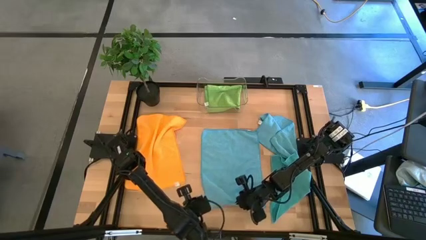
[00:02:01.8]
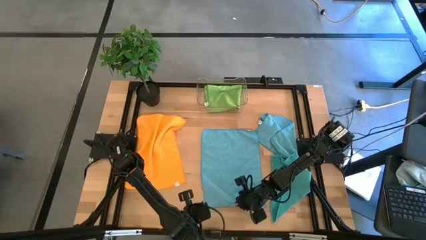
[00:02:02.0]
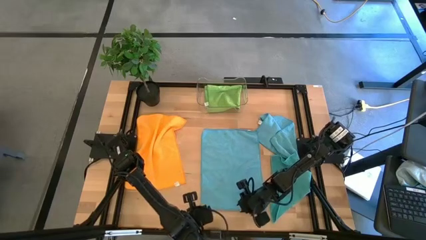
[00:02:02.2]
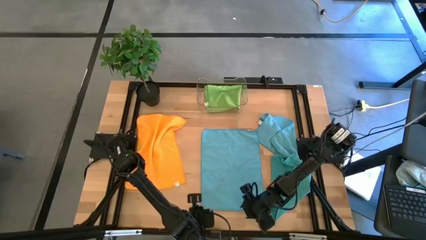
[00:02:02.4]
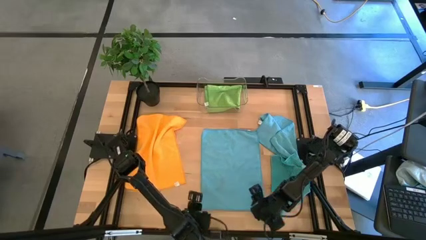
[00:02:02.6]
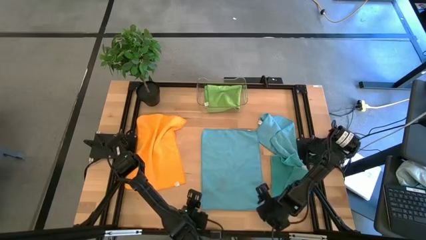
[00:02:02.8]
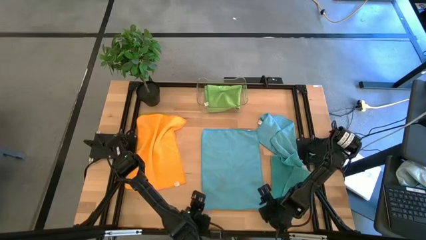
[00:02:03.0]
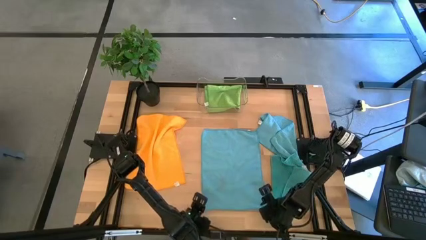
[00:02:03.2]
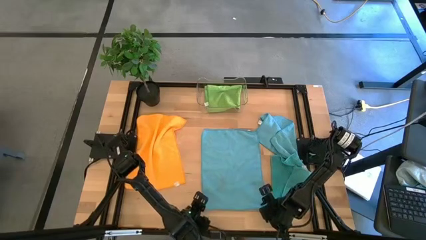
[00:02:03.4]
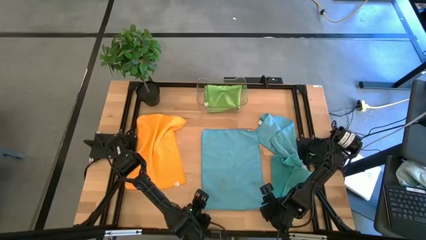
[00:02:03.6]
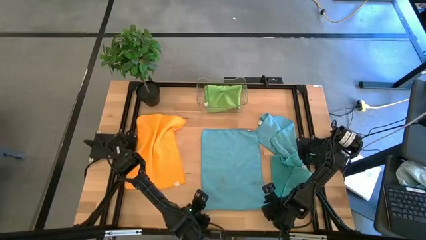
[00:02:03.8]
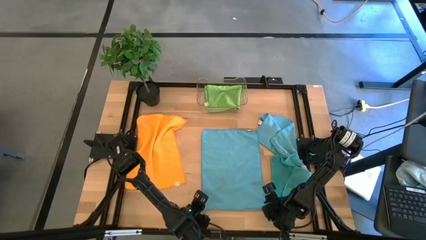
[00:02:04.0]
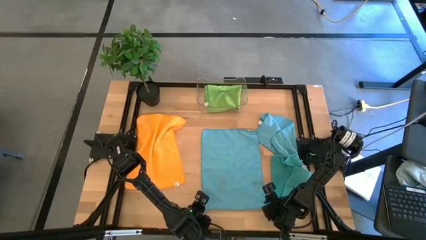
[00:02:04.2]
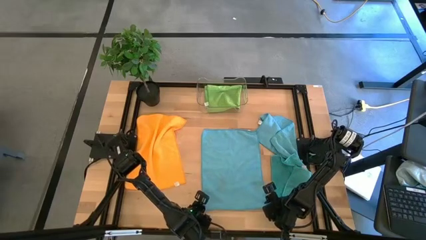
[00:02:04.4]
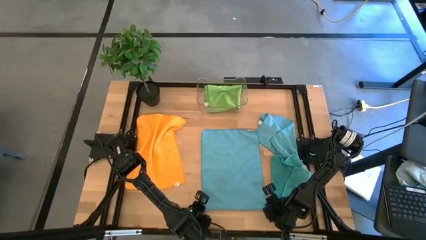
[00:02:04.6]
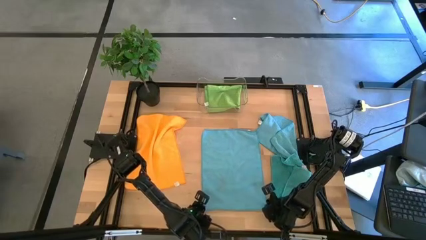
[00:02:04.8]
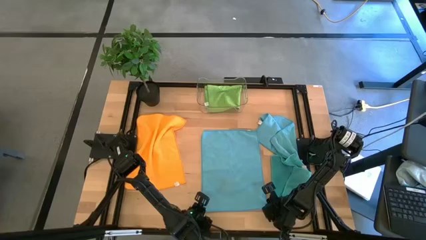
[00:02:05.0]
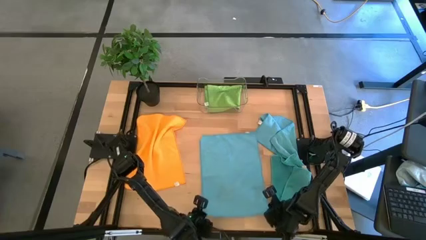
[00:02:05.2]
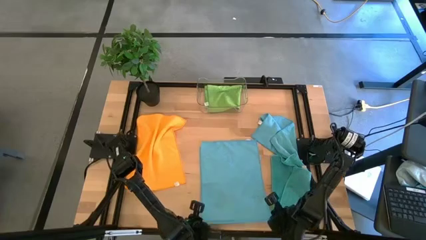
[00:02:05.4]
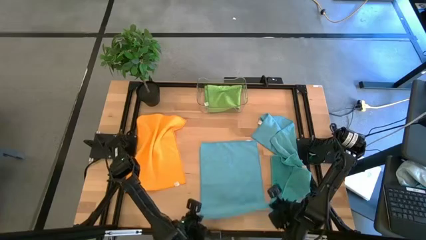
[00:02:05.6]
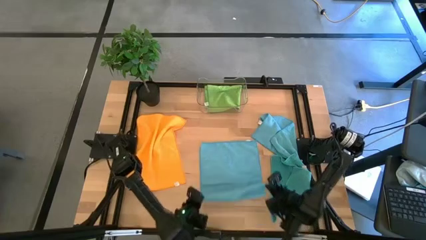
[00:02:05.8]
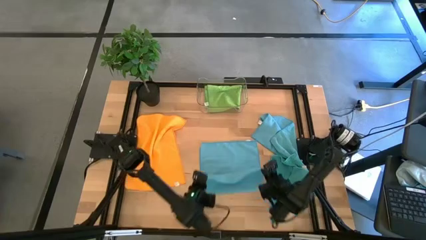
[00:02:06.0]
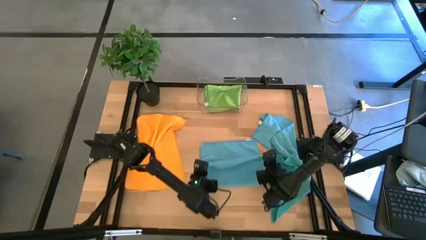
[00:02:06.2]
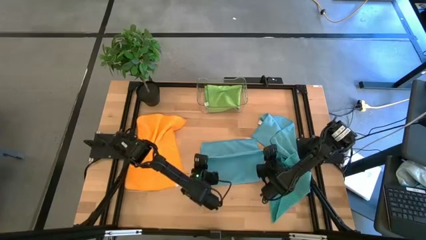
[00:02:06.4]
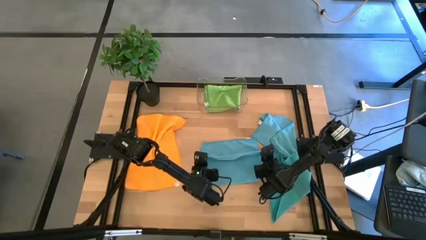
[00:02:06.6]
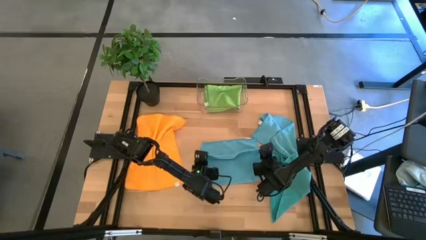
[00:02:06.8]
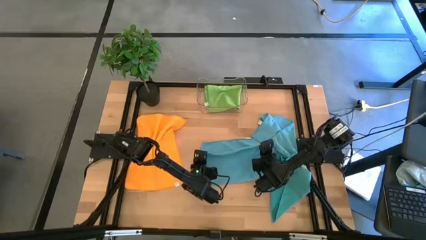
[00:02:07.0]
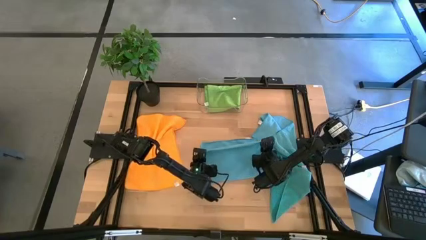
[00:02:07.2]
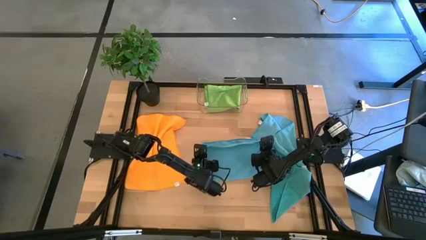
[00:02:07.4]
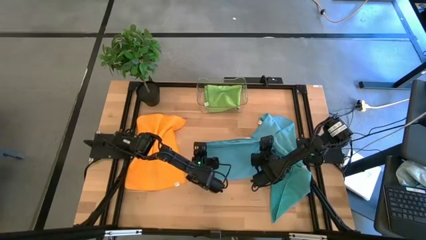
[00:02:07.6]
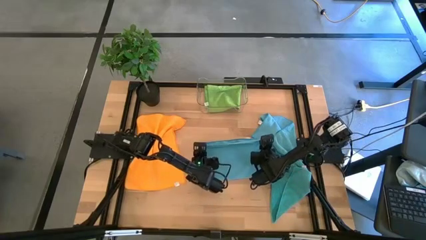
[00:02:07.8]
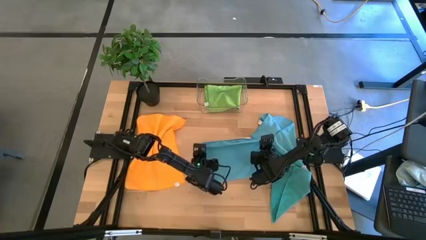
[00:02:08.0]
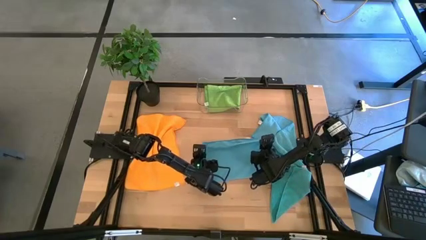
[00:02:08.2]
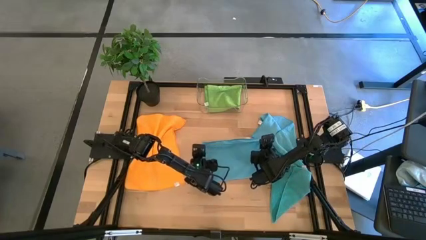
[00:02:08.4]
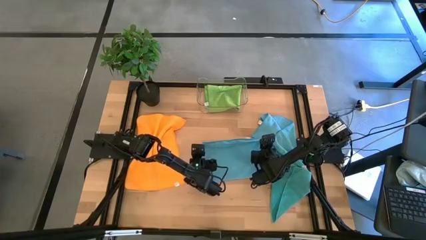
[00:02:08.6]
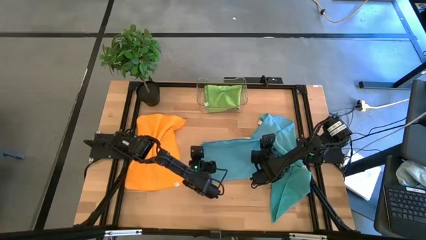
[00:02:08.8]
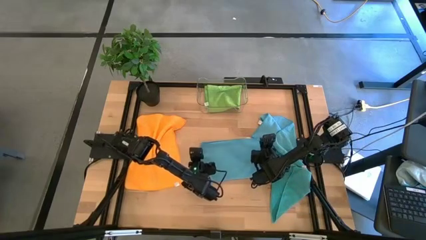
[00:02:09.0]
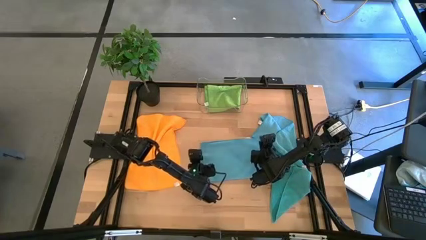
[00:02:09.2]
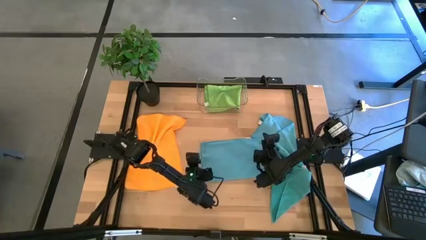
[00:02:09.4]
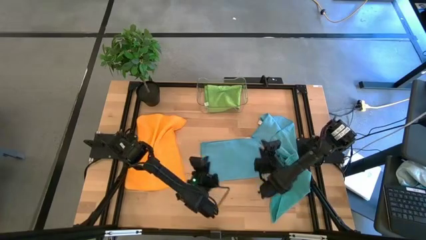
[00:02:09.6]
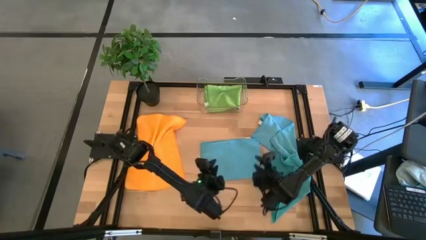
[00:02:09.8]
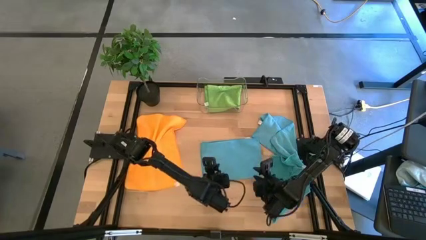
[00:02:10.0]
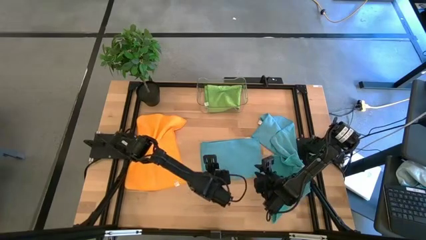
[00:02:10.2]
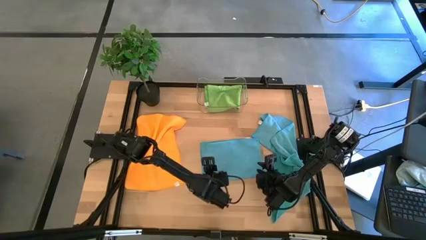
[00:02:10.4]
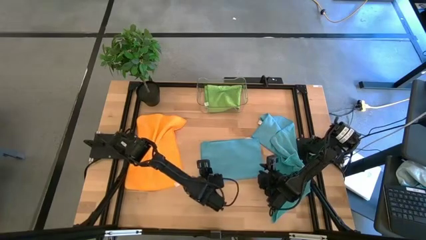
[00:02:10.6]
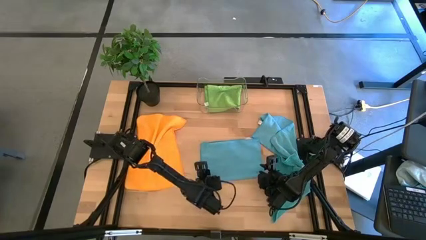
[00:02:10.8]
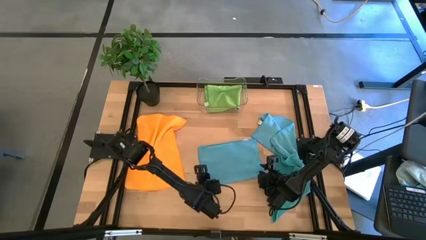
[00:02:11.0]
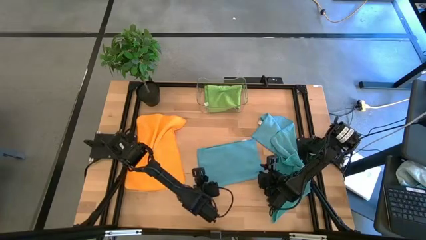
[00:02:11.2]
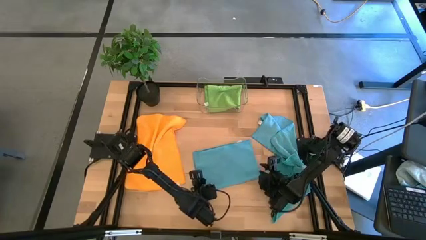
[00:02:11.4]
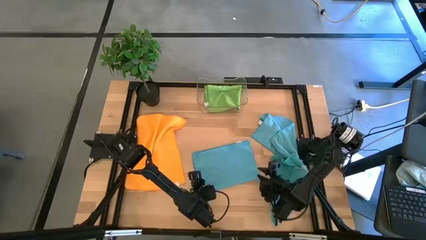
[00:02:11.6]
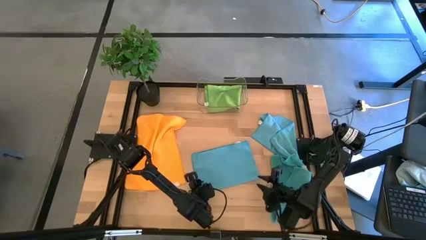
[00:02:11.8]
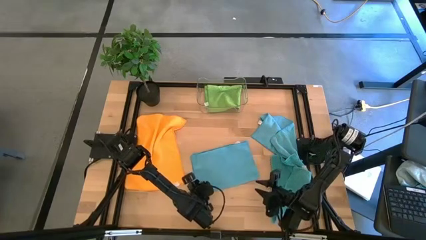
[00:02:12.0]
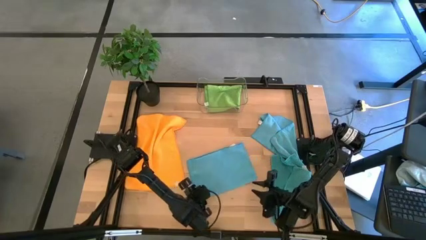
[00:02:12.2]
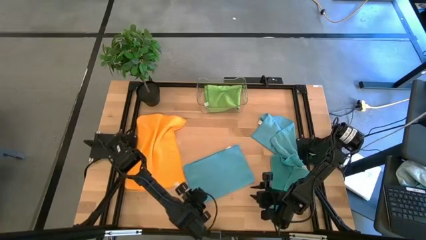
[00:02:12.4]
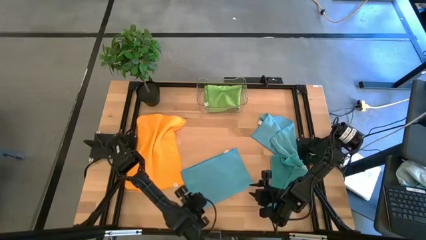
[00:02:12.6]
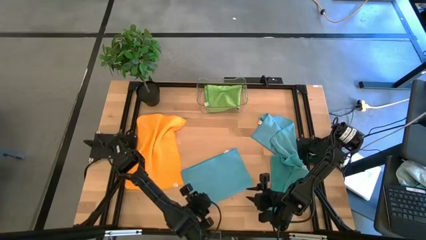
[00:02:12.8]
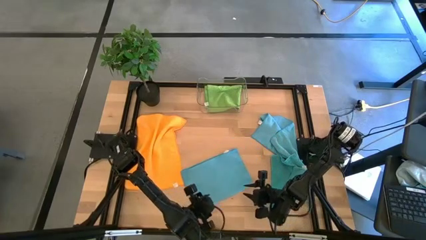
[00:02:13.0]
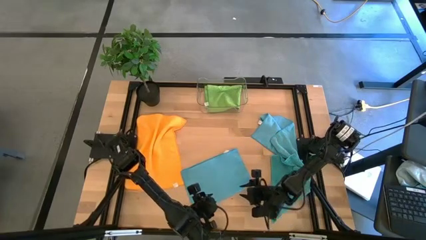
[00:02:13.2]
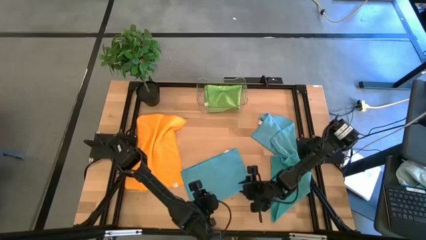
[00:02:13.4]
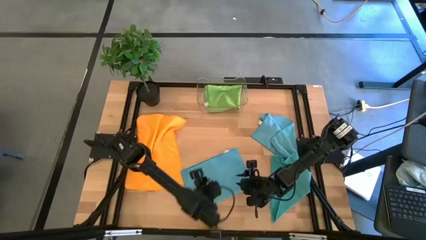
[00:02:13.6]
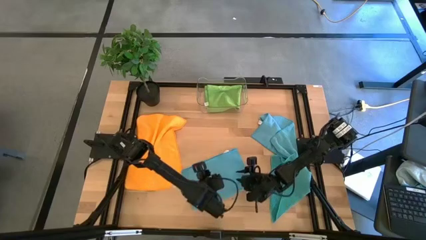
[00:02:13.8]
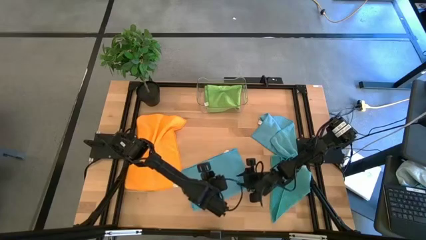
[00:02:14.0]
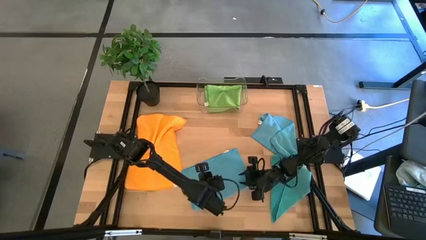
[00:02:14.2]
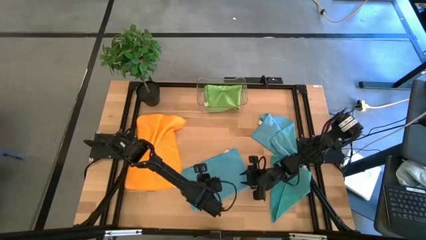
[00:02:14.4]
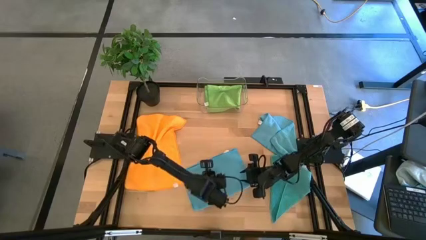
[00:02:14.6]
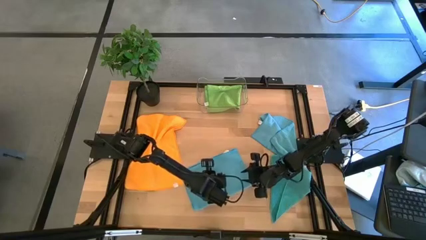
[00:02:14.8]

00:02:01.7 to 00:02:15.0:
Task: Fold microfiber towels
Fold the top left blue microfiber towel
